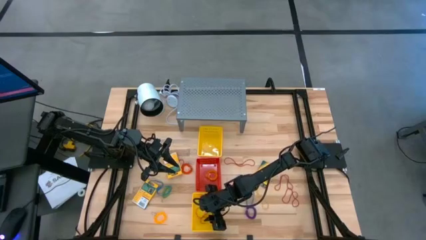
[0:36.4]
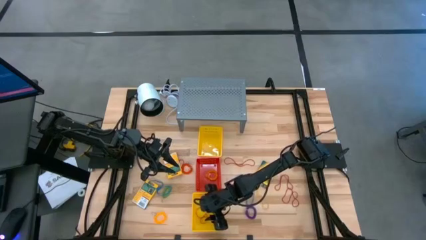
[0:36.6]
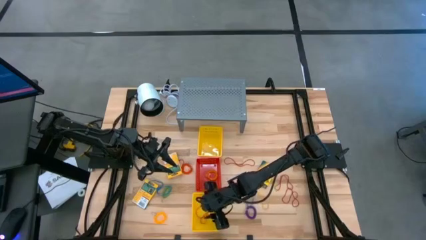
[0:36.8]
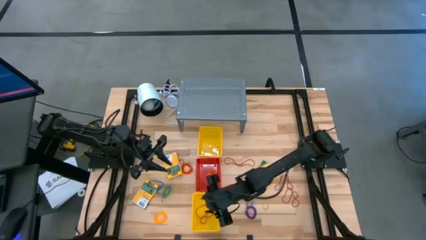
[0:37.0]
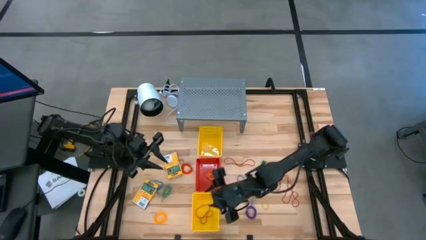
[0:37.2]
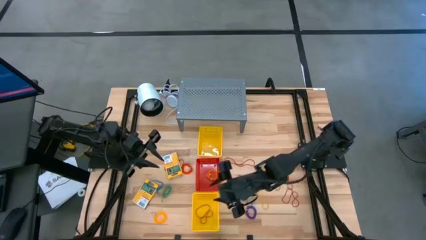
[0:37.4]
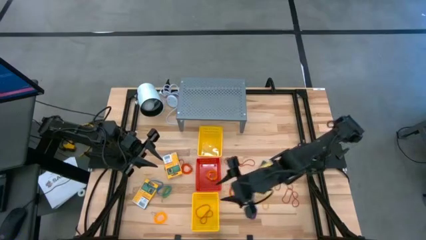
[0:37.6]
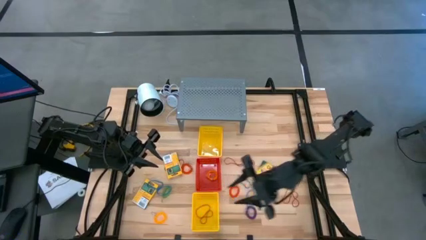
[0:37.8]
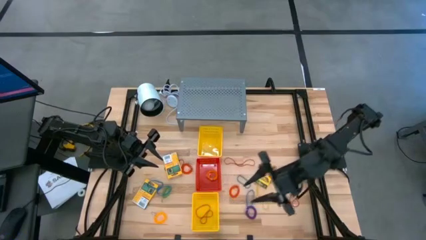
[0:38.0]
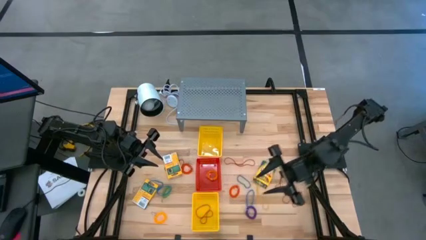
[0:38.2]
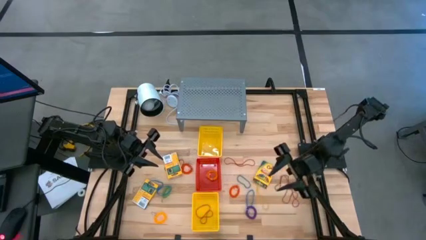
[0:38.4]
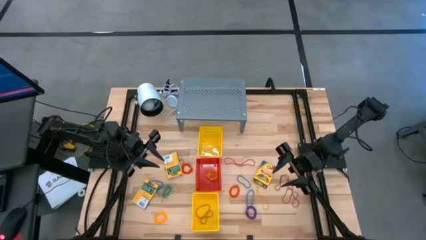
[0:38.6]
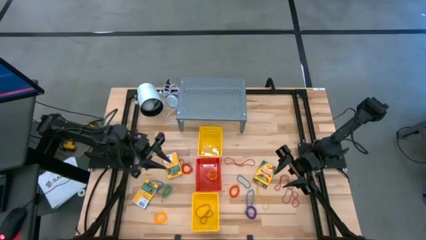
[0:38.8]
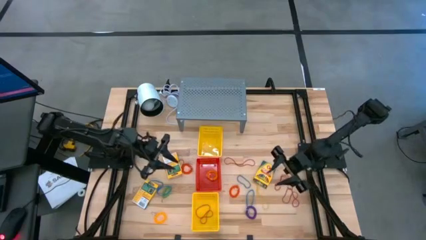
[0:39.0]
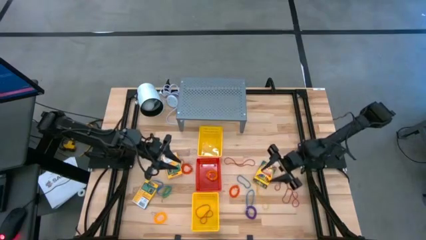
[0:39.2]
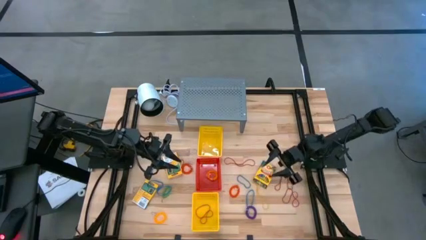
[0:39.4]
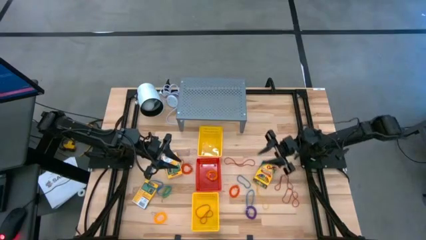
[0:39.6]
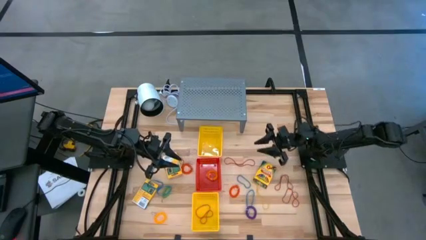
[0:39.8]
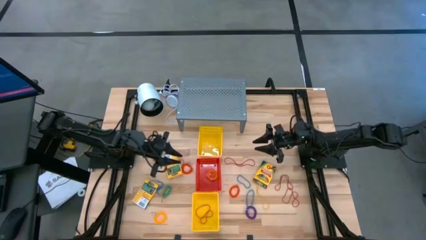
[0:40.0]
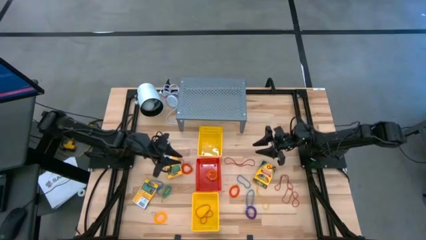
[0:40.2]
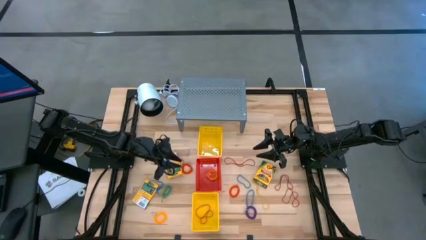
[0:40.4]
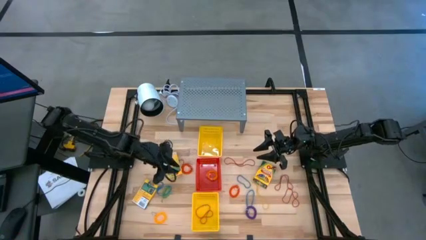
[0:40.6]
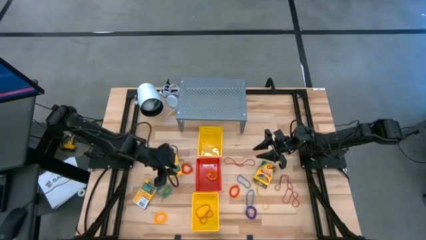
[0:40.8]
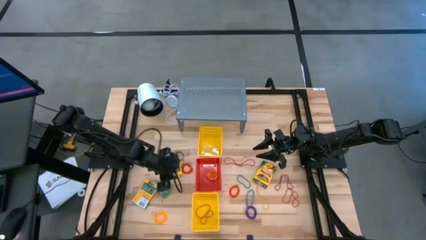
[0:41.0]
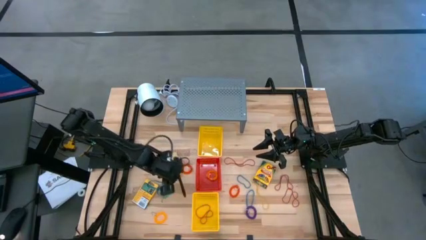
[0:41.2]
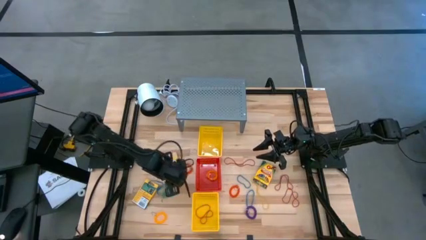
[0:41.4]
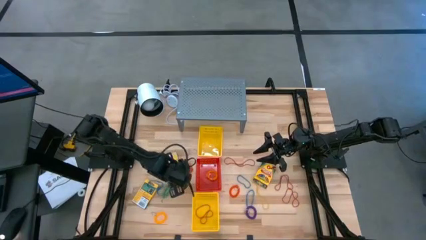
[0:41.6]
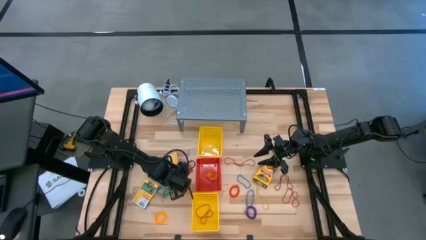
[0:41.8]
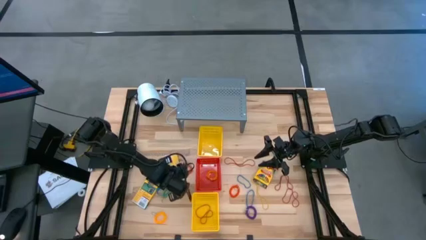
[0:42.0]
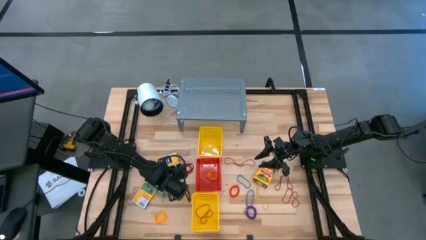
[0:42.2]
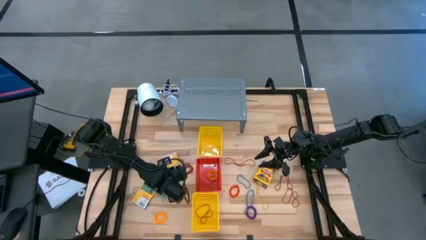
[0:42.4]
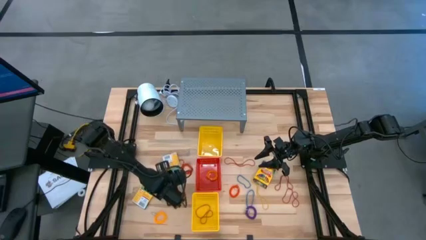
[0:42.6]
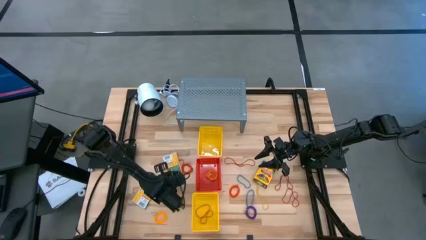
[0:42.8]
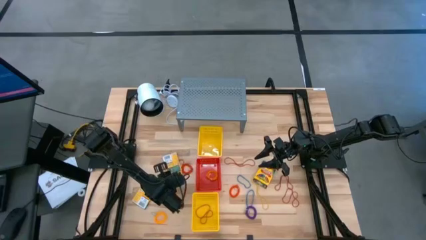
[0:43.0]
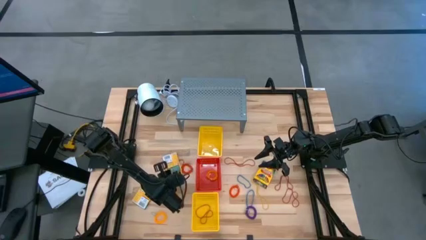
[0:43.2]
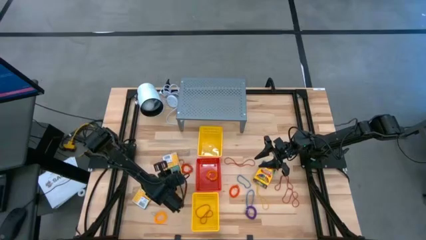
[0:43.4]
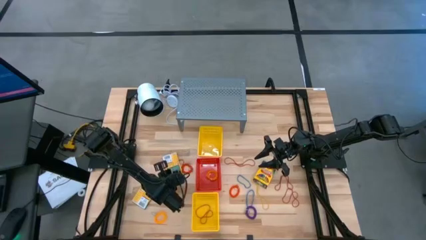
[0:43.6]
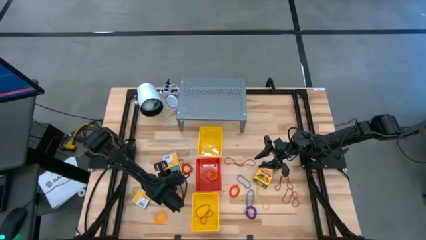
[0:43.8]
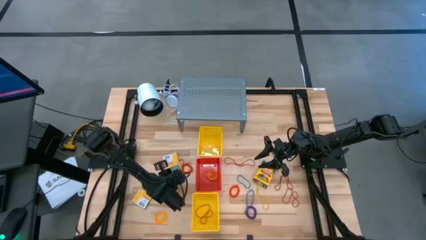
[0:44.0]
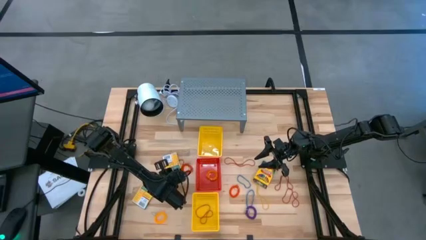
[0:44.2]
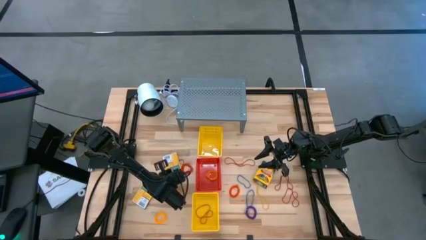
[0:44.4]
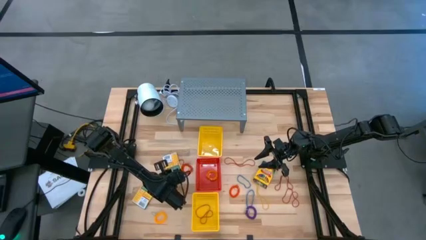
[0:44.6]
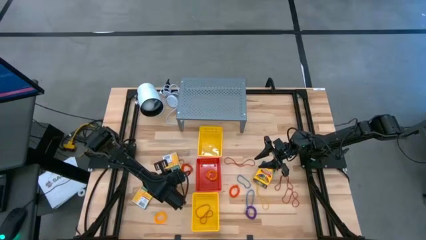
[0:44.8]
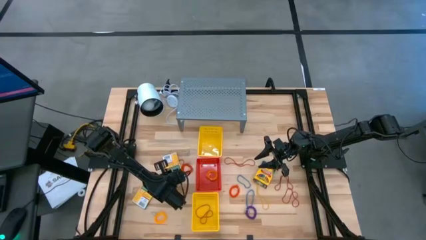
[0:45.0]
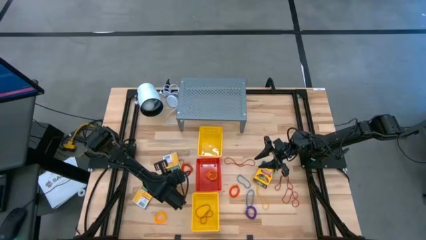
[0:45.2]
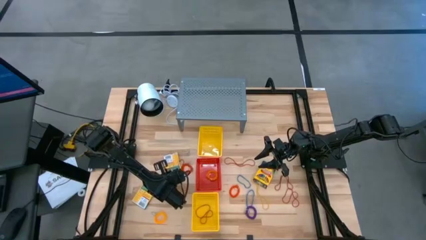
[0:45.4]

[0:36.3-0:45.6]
Task: Pick & Place Office Desk Supplies
Put the crayon into the top yellow bin

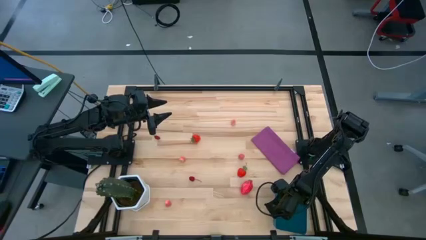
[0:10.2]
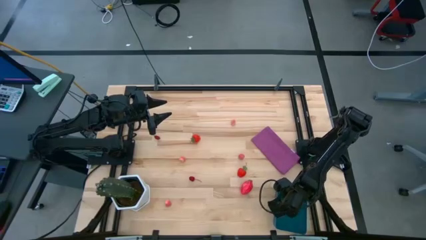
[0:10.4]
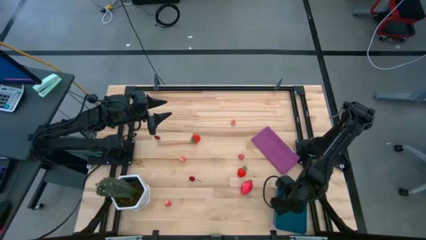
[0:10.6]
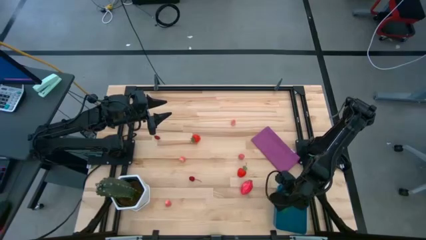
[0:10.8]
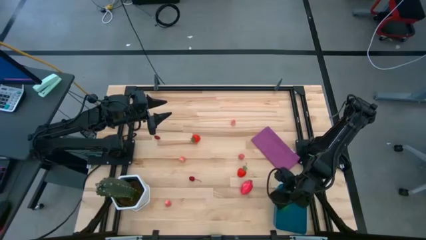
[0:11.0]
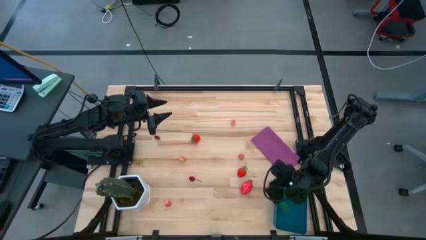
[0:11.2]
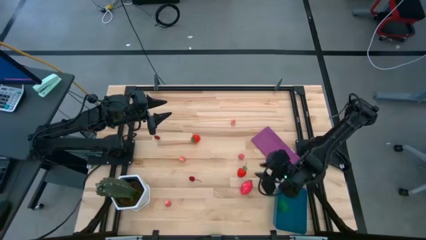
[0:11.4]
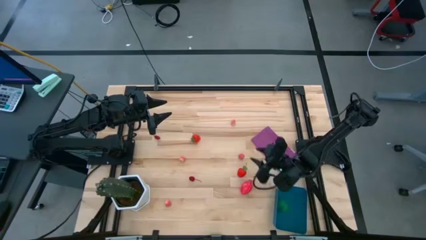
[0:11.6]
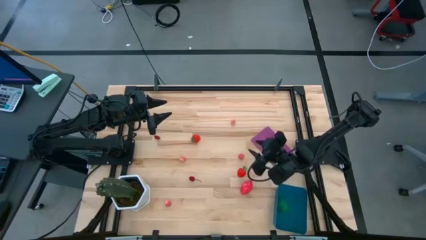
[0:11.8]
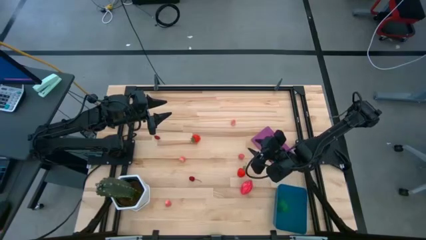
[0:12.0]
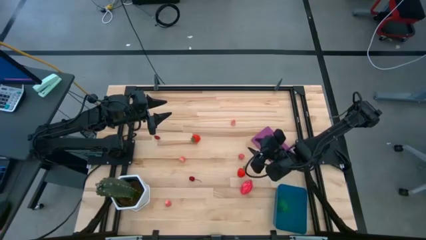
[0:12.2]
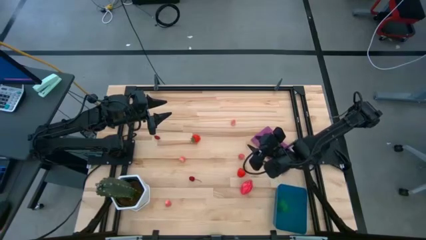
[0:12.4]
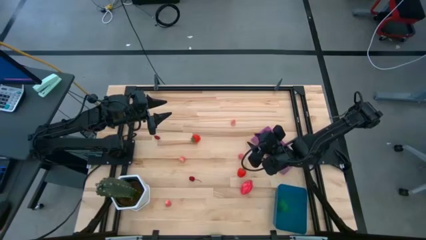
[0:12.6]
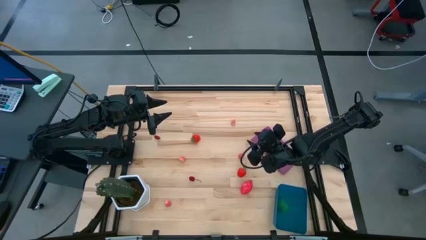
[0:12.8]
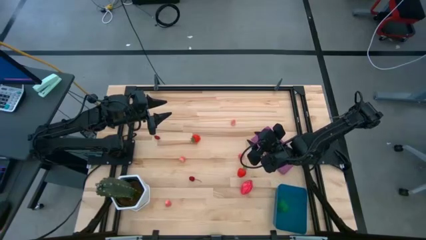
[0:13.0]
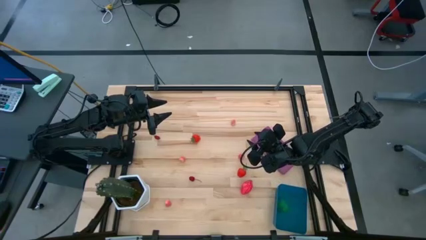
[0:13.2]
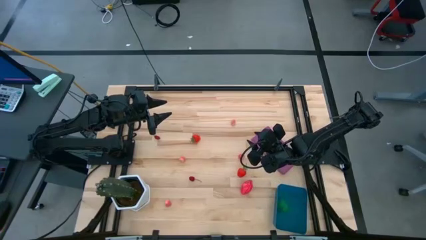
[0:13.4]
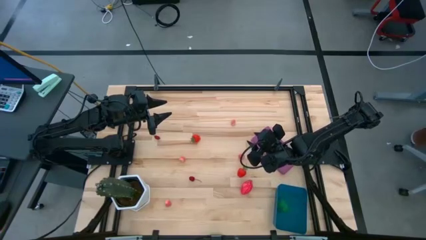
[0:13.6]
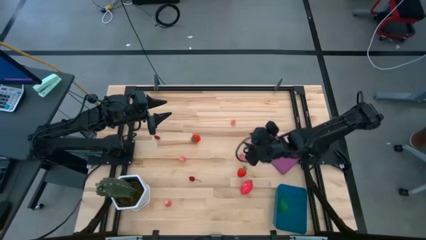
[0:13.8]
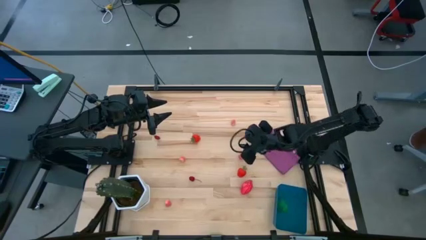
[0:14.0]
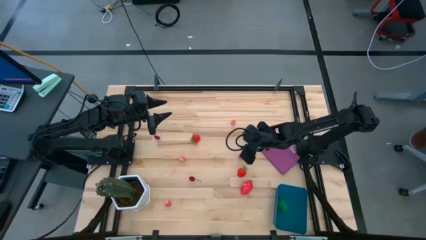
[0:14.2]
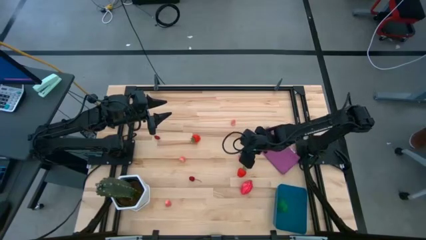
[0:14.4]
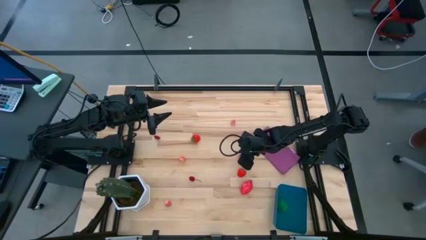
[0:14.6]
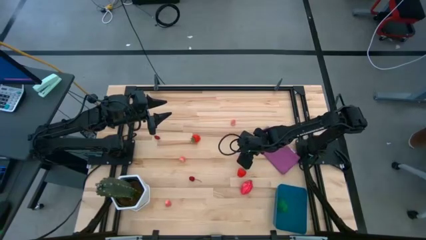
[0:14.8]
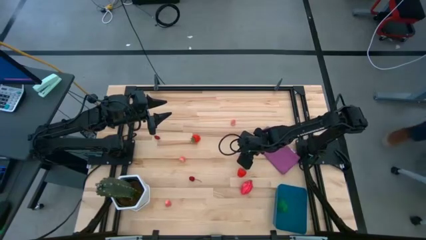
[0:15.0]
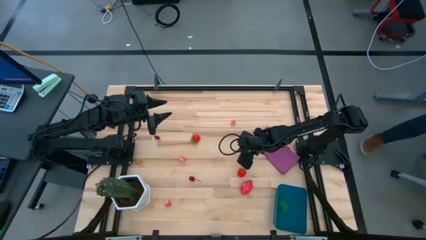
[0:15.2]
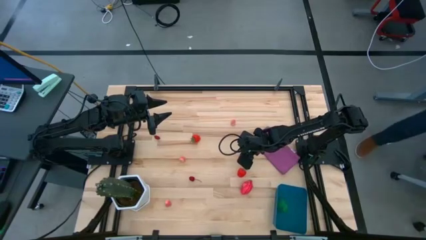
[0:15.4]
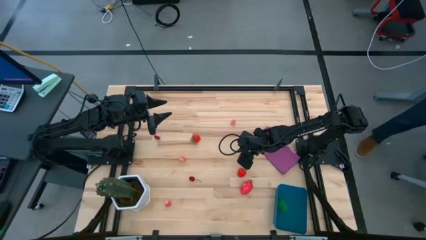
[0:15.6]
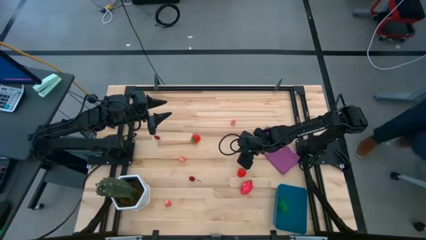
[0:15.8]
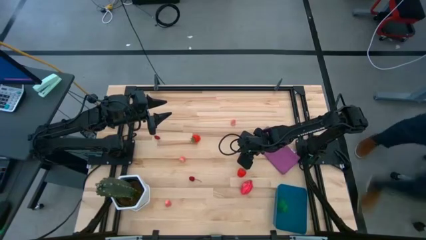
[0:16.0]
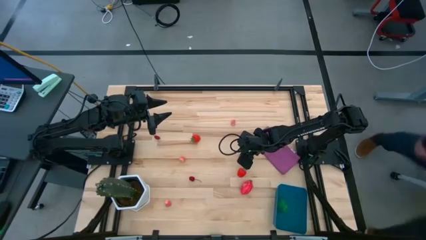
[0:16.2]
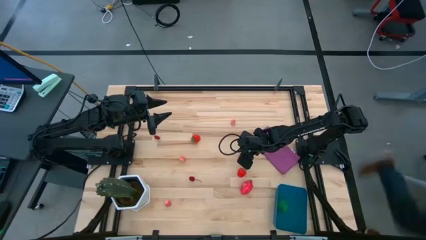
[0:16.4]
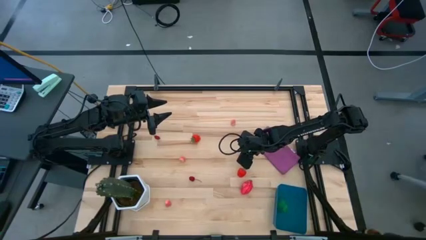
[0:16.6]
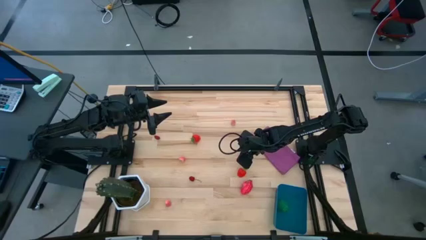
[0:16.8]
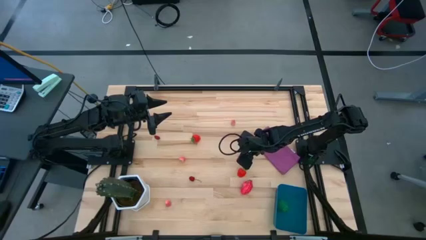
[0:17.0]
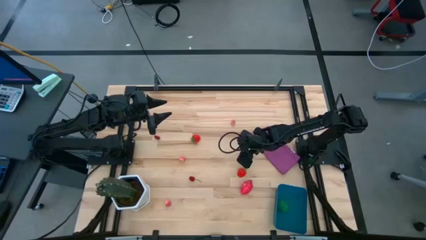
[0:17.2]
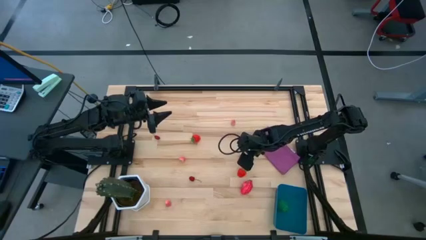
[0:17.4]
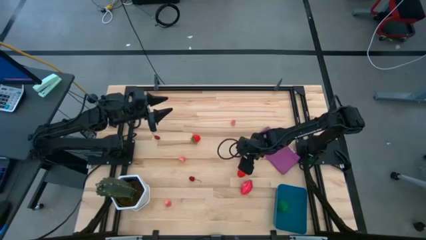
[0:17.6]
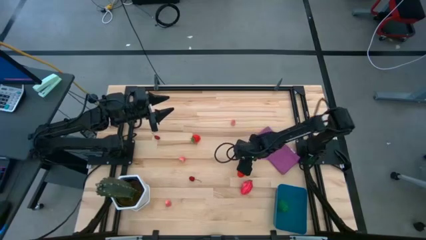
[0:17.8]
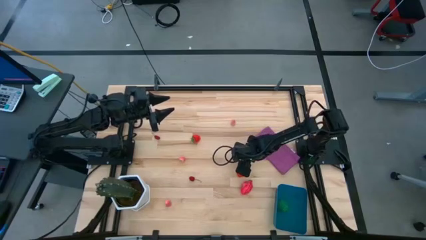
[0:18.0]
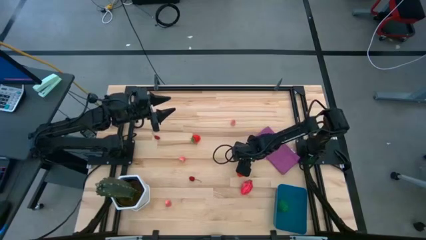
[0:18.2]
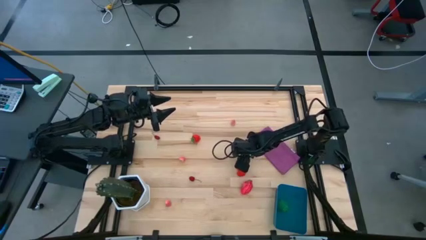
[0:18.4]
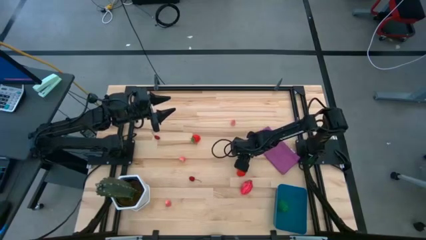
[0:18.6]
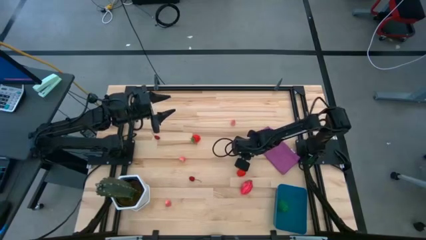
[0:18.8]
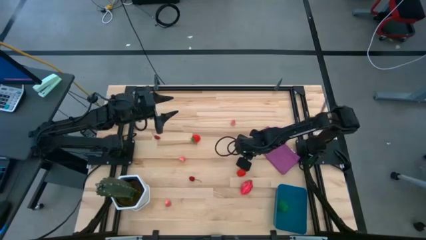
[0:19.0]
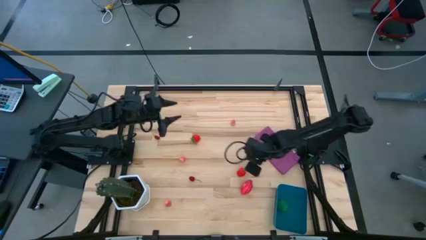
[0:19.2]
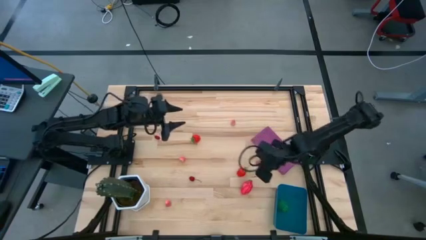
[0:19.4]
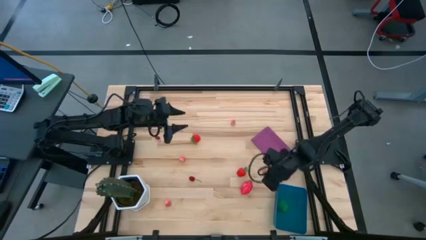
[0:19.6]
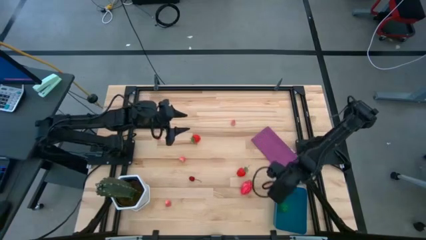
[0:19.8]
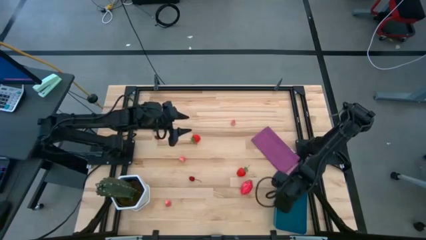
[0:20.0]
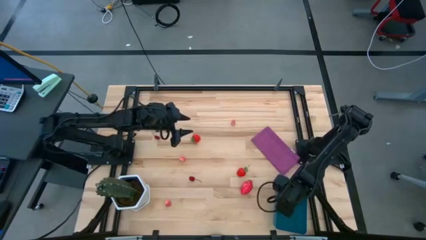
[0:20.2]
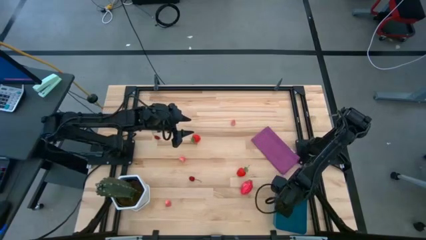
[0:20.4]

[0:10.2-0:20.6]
Task: Pick and placing Produce into tupperware
Put the pink peach into the blue bin
